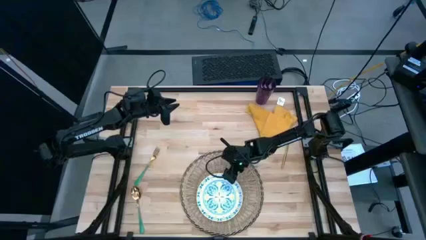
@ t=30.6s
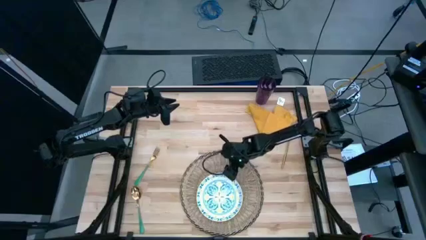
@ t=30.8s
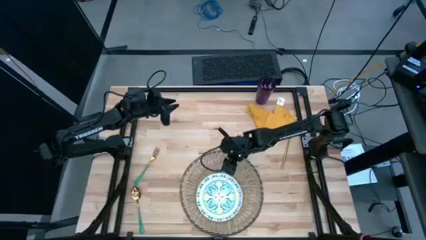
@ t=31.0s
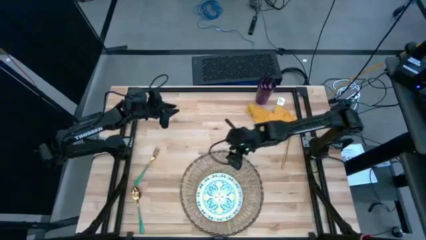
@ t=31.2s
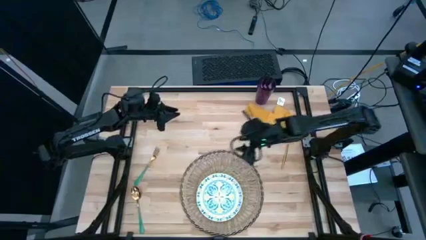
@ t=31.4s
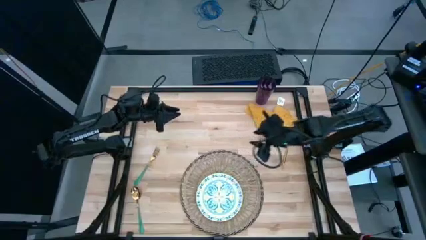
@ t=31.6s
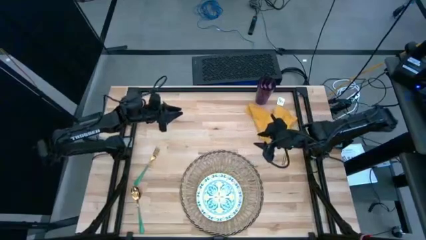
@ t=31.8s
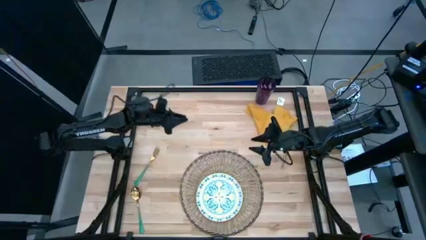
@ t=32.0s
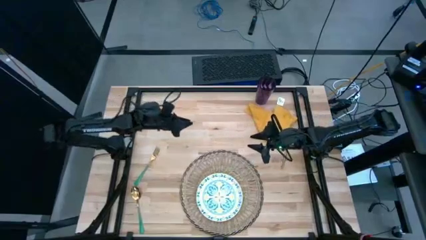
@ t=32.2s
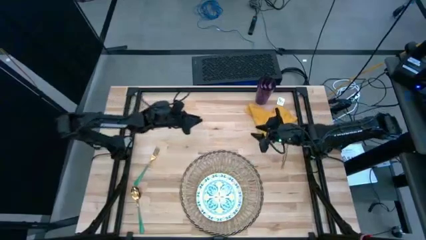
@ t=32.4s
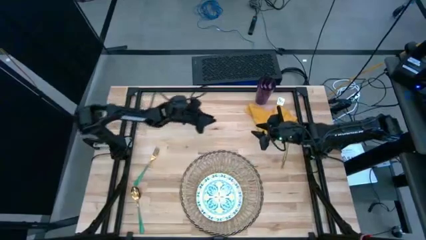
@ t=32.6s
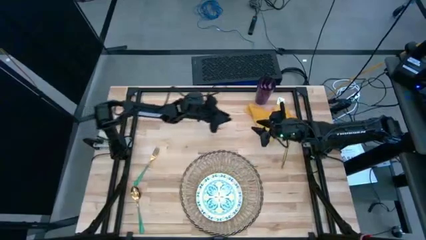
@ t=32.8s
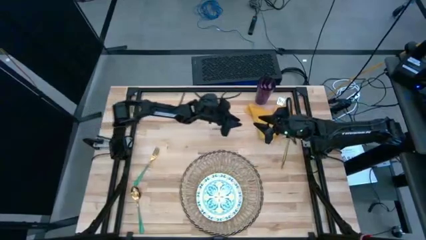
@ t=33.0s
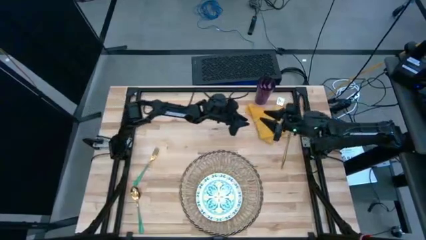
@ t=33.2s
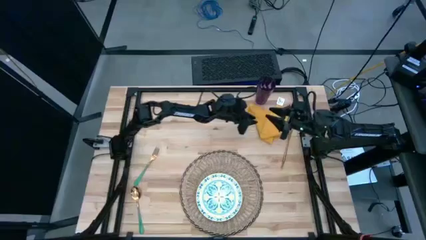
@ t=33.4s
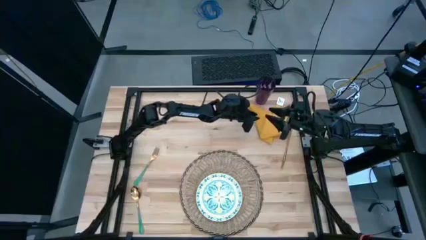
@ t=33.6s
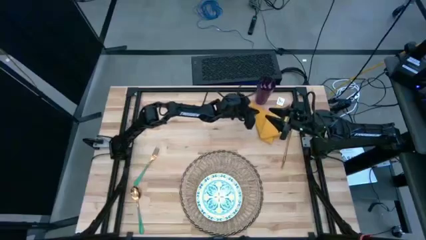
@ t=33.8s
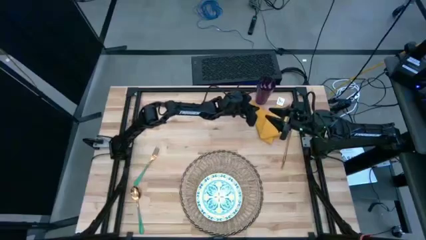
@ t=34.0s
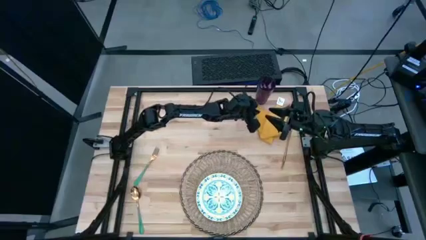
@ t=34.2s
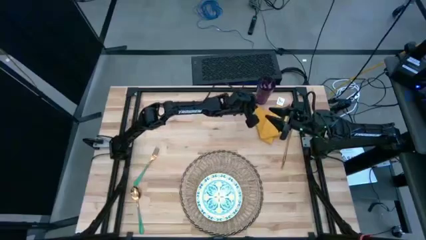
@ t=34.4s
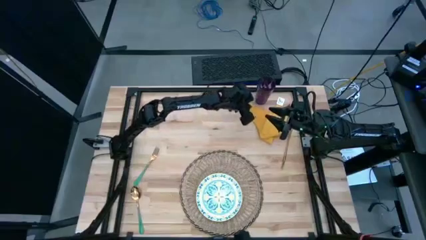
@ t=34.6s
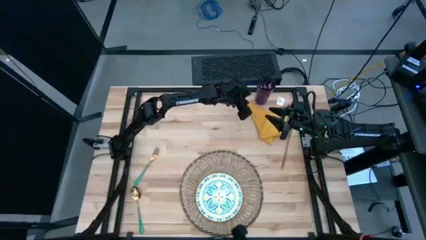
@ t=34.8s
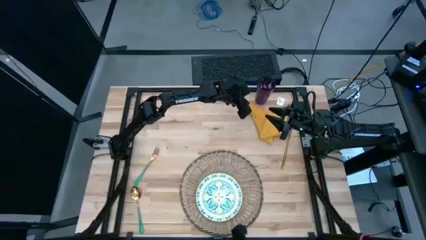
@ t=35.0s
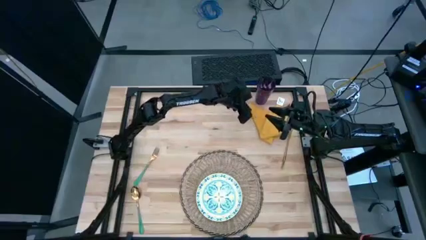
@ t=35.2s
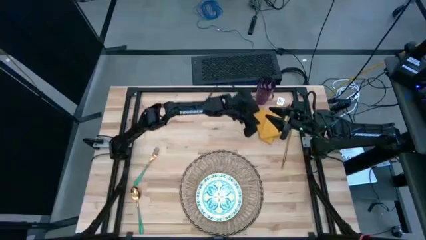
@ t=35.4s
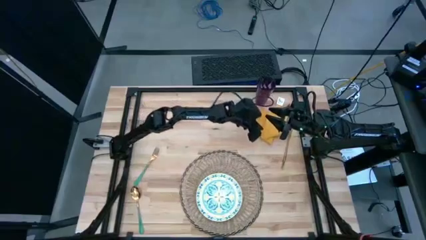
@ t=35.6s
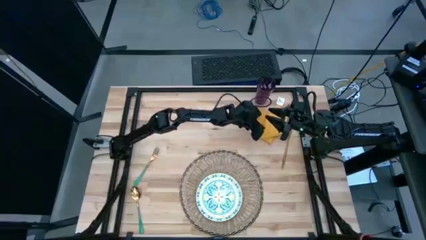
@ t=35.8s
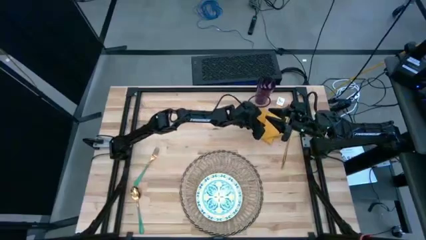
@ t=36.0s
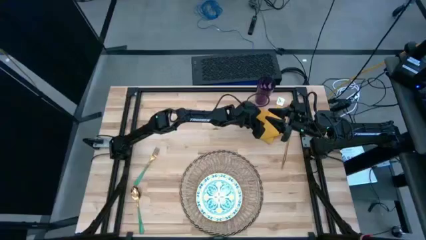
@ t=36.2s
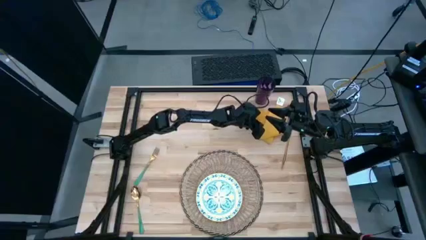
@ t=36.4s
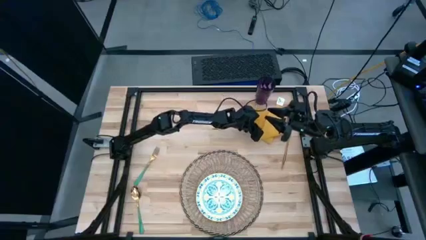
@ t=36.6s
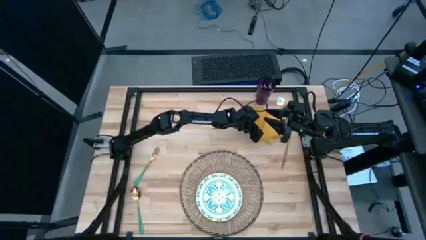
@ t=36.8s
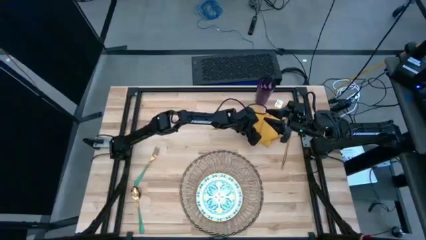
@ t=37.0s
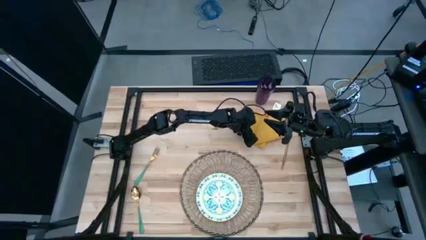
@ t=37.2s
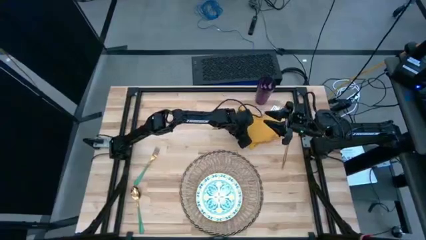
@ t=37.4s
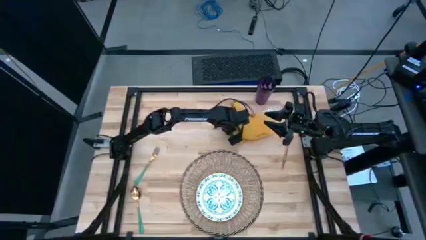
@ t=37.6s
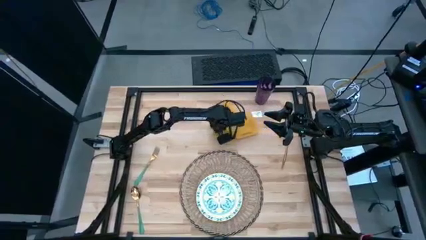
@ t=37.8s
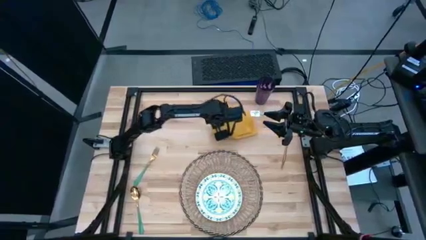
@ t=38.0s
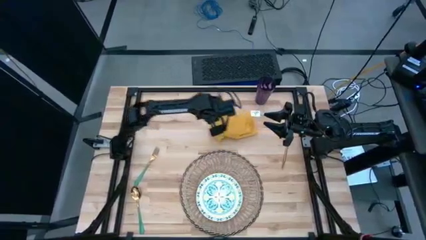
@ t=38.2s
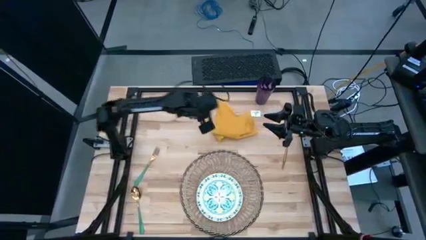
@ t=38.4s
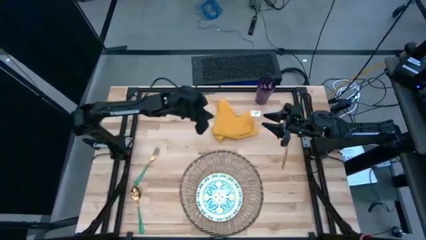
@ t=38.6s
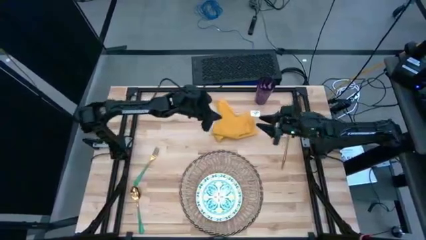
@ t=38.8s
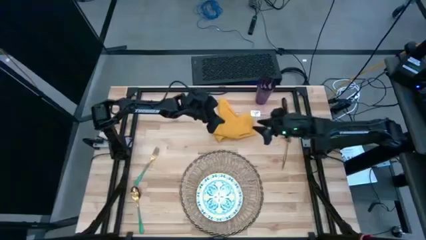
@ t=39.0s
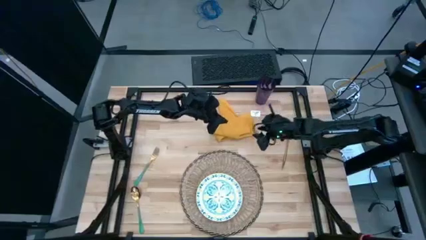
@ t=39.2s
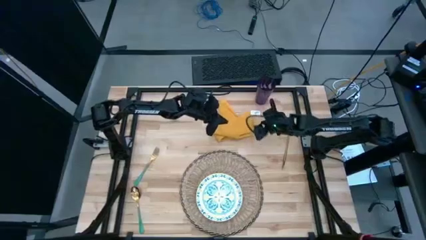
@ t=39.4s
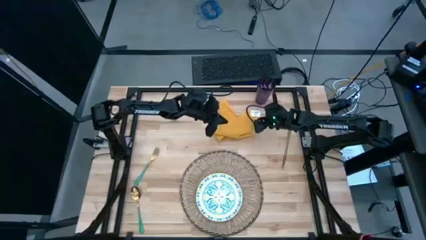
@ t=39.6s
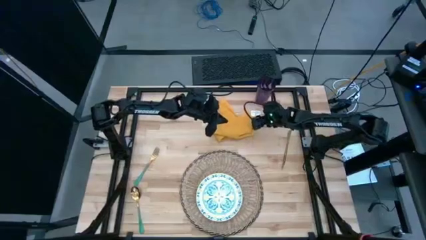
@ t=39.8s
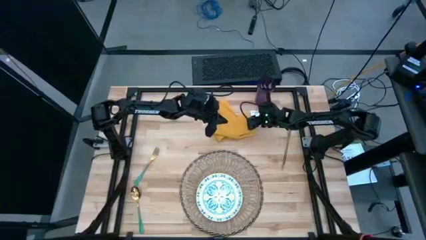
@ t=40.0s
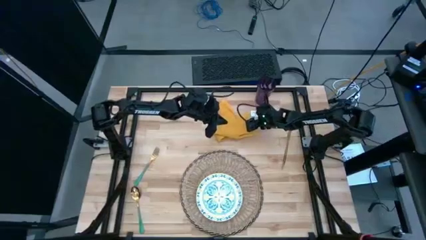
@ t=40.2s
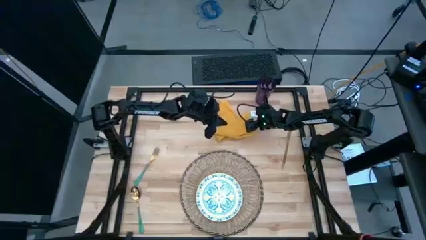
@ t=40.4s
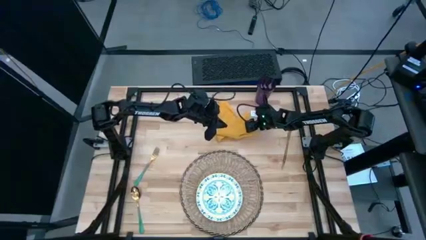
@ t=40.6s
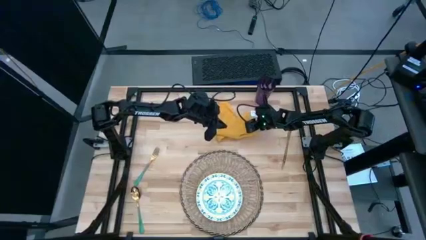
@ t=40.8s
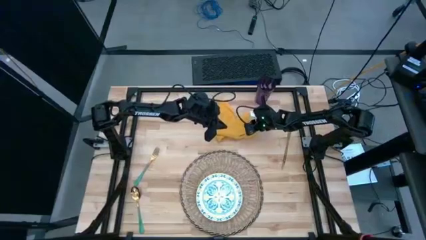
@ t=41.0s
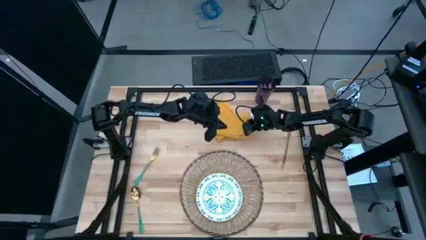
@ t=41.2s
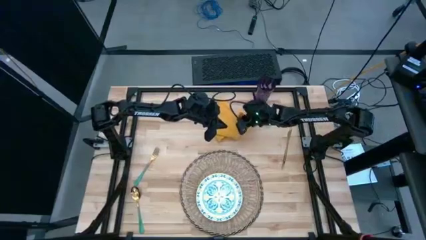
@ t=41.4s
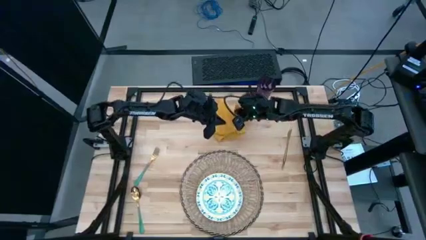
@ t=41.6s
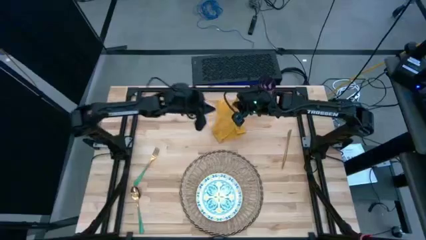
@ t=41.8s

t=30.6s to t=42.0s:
Task: Set table place
Fold the yellow napkin

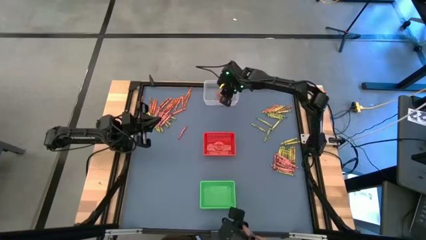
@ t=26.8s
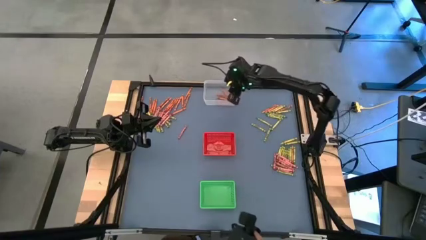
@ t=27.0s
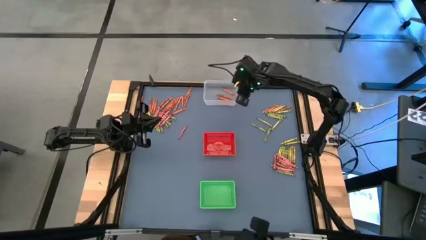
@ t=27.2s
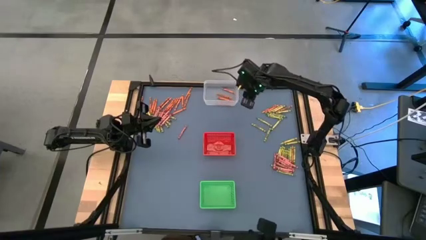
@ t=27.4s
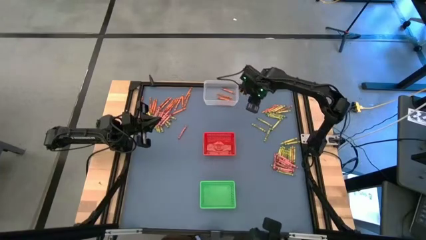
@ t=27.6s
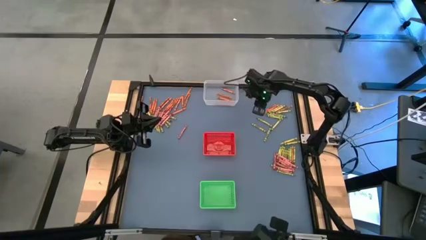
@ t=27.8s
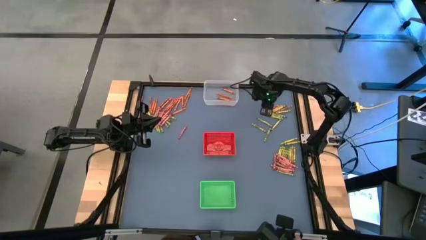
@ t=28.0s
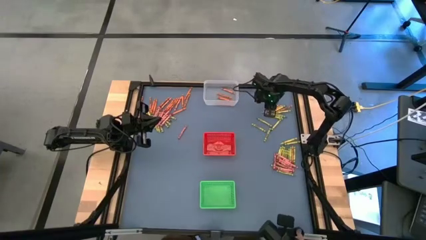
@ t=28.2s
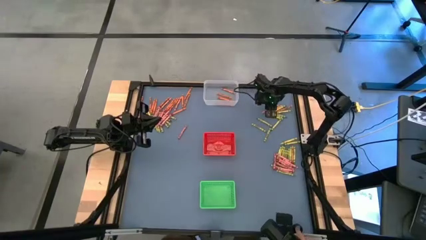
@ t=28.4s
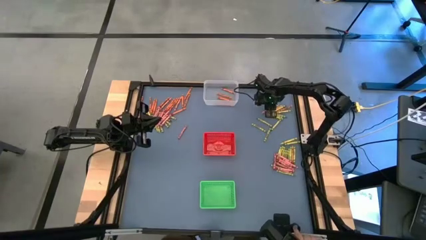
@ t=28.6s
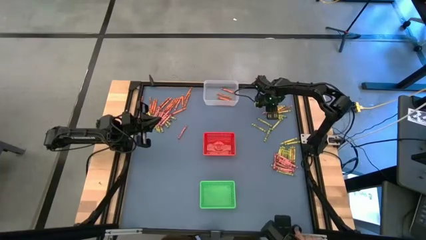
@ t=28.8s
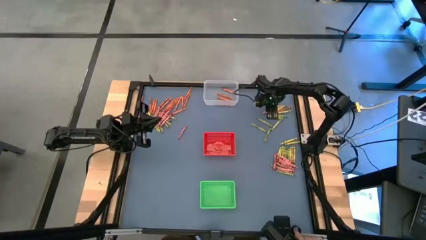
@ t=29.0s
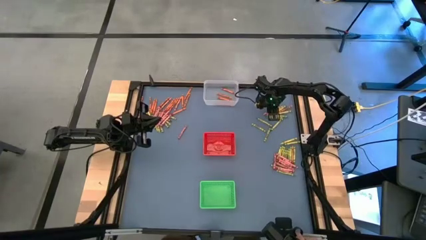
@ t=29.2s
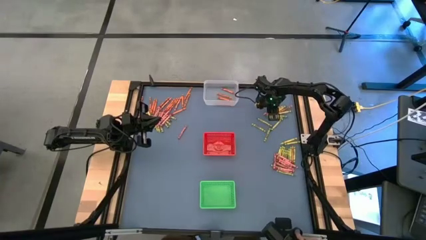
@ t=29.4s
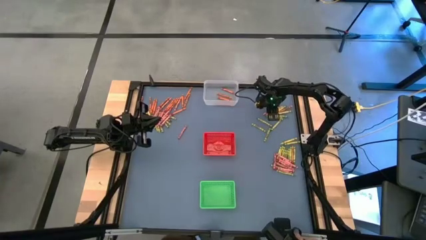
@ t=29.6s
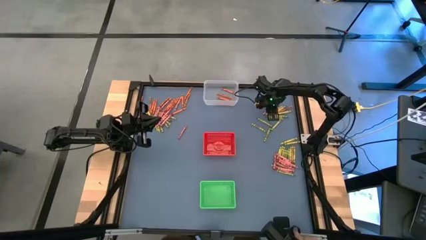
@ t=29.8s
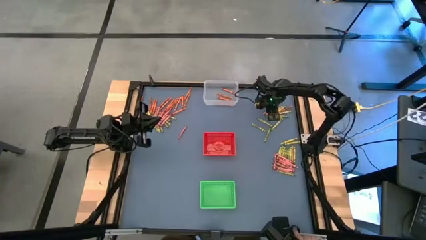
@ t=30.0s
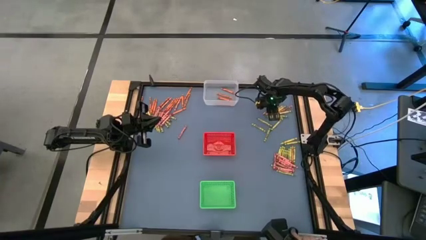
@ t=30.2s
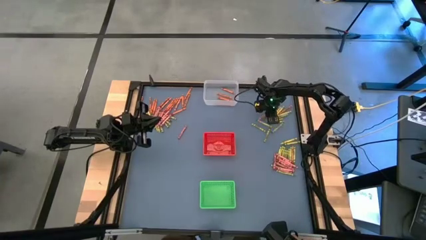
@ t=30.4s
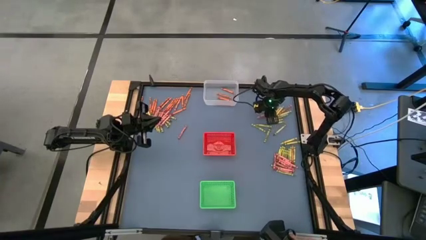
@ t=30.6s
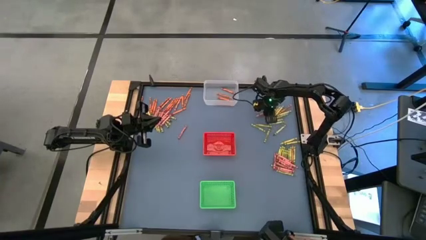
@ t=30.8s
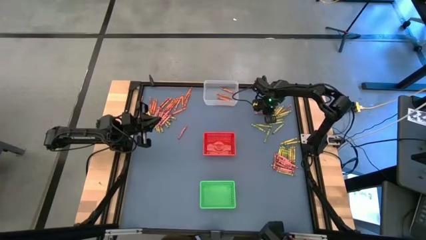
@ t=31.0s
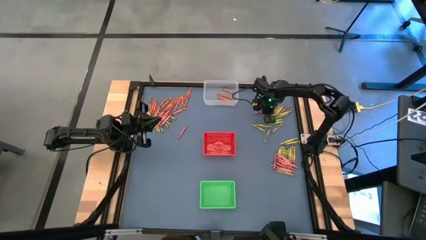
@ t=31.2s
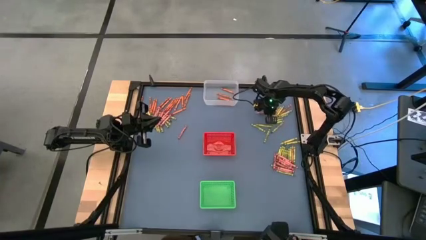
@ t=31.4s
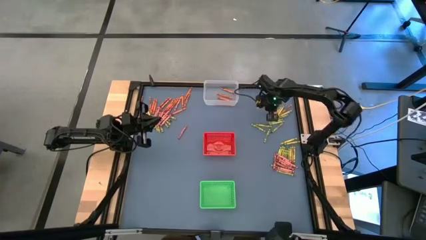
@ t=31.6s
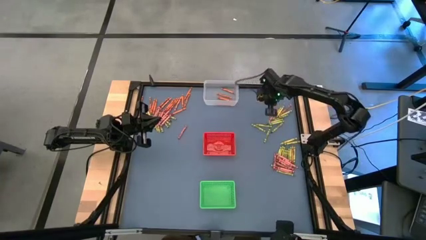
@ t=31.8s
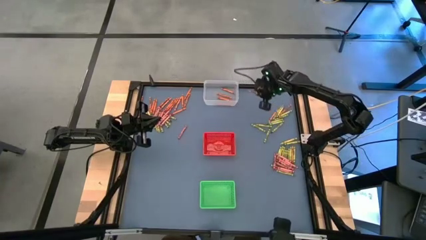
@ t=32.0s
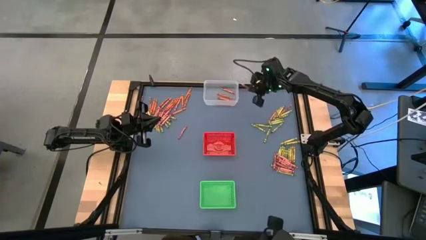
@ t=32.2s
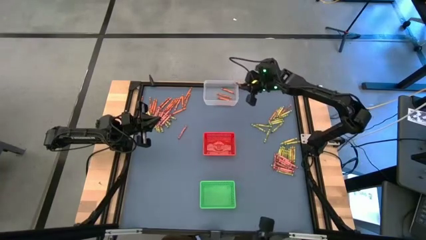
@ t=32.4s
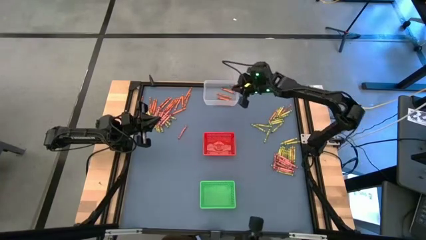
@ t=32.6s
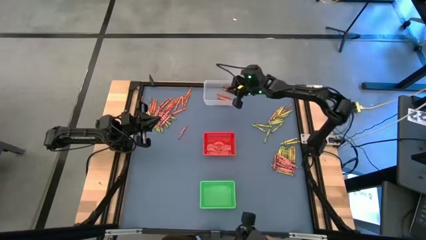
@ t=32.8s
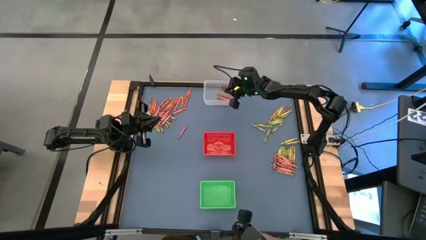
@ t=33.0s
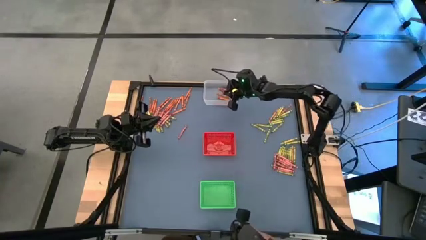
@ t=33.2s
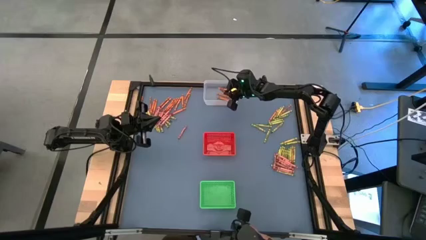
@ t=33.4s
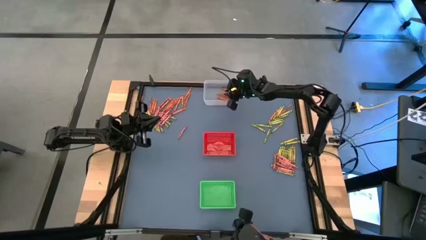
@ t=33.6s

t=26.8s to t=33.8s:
Task: Sort crayons
Put the orange crayon into the transparent bin
